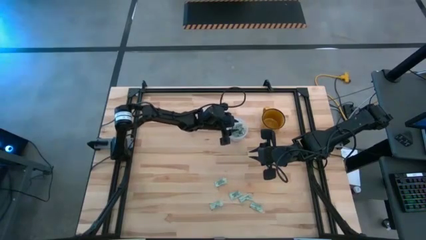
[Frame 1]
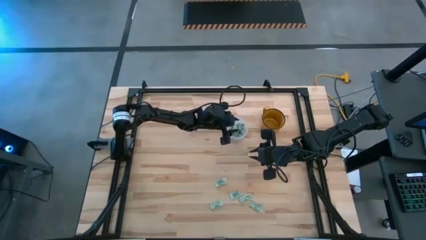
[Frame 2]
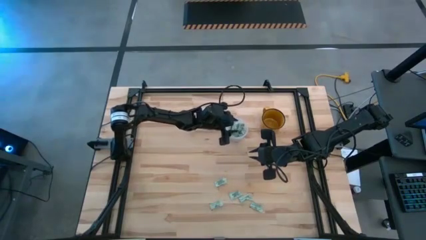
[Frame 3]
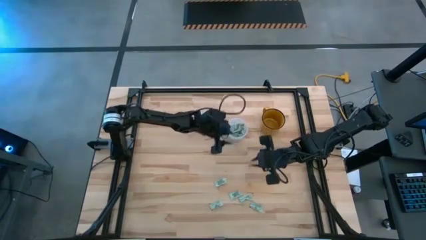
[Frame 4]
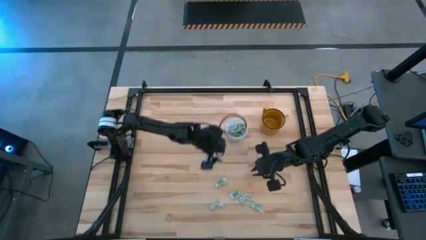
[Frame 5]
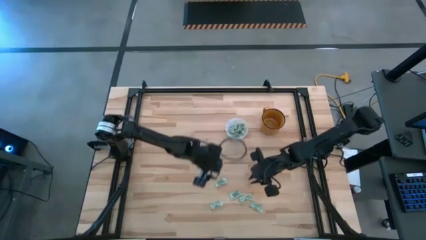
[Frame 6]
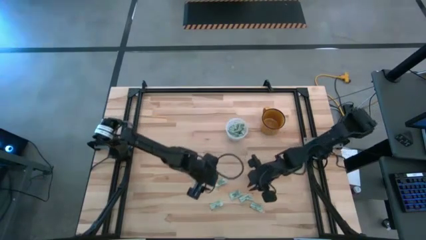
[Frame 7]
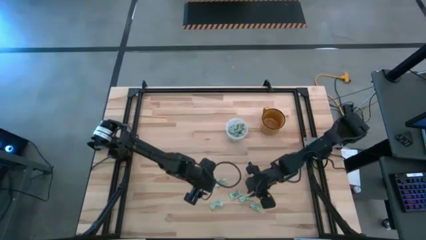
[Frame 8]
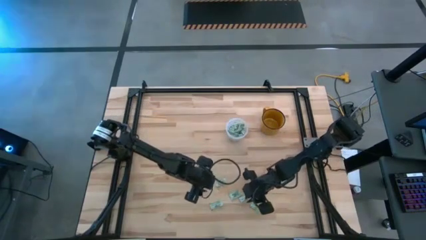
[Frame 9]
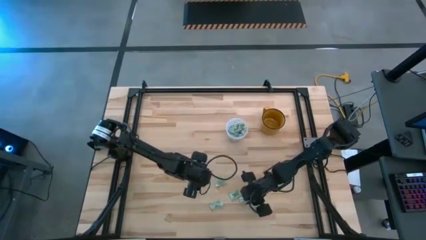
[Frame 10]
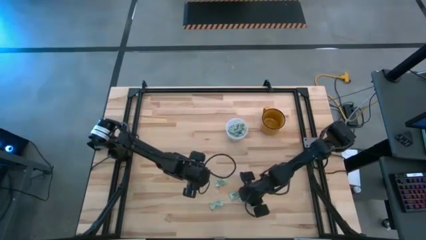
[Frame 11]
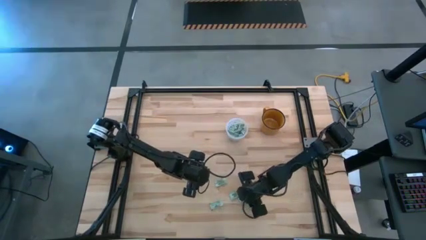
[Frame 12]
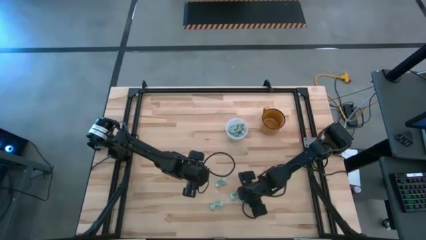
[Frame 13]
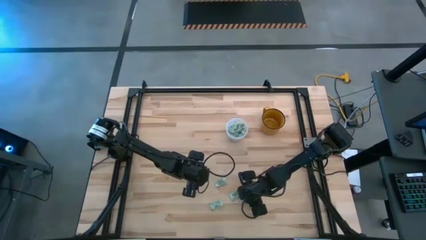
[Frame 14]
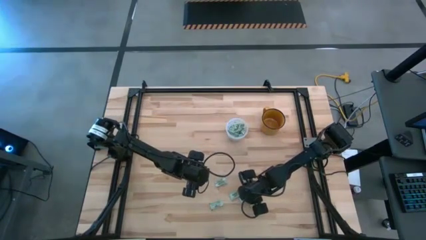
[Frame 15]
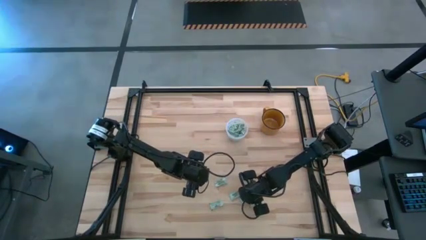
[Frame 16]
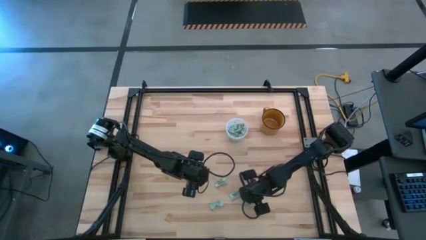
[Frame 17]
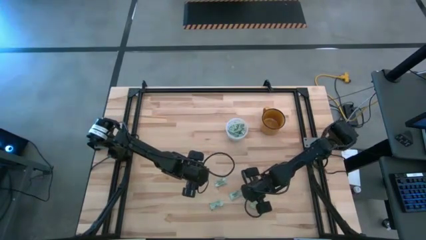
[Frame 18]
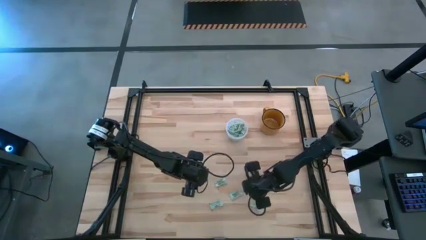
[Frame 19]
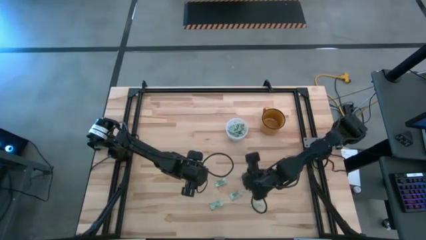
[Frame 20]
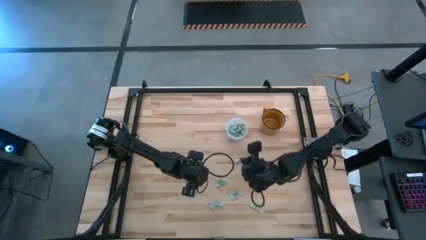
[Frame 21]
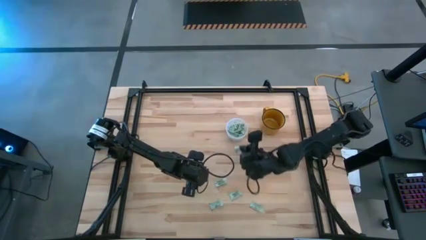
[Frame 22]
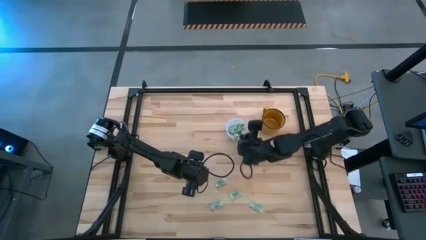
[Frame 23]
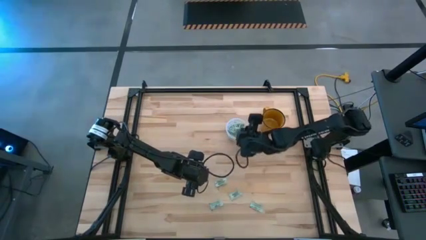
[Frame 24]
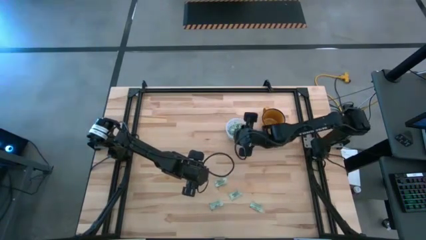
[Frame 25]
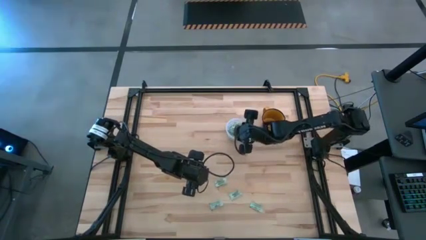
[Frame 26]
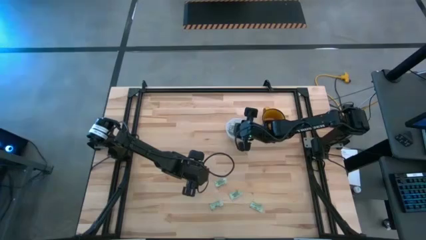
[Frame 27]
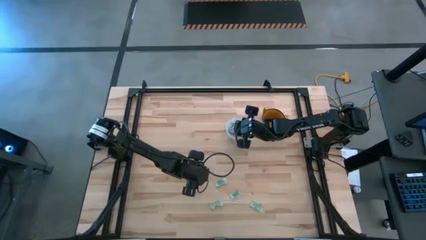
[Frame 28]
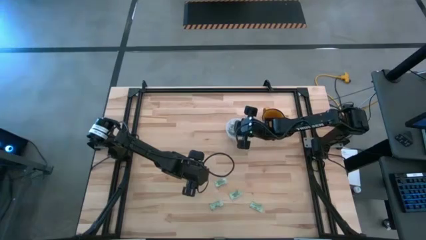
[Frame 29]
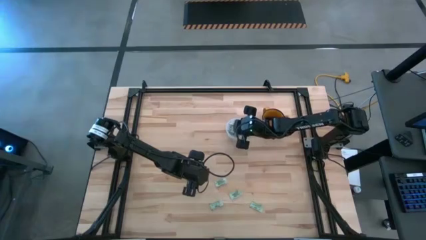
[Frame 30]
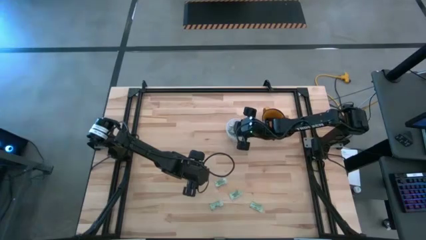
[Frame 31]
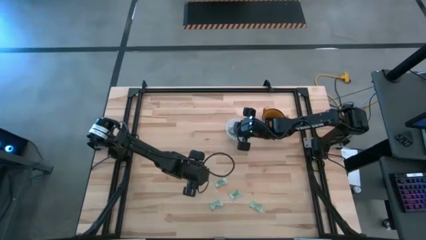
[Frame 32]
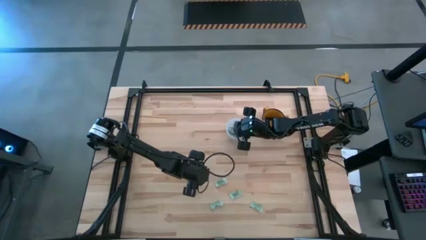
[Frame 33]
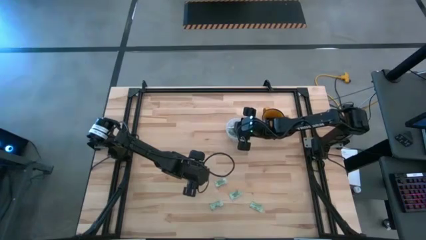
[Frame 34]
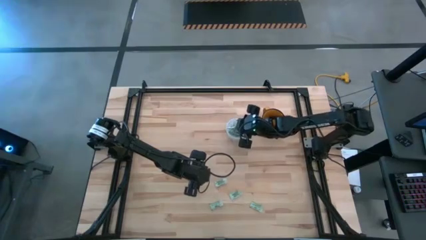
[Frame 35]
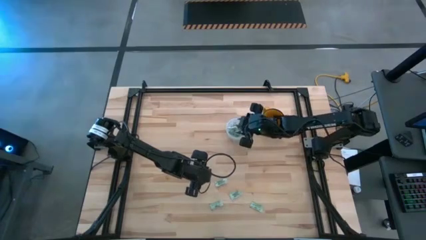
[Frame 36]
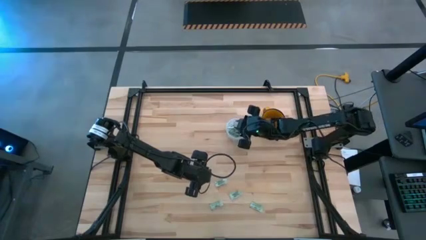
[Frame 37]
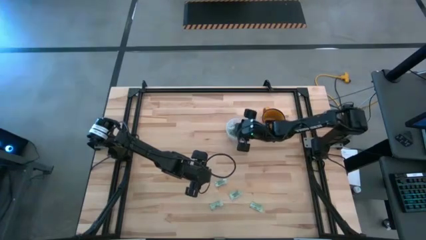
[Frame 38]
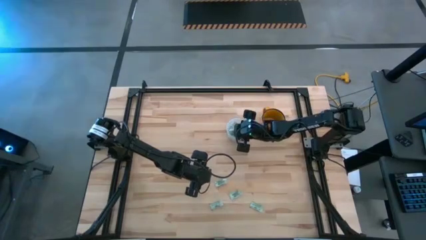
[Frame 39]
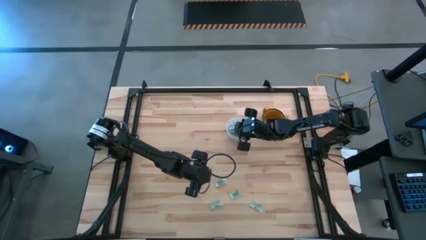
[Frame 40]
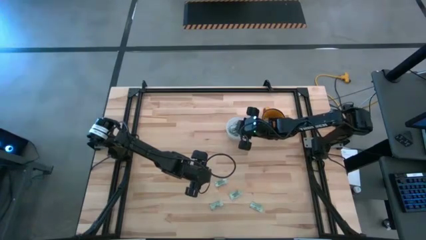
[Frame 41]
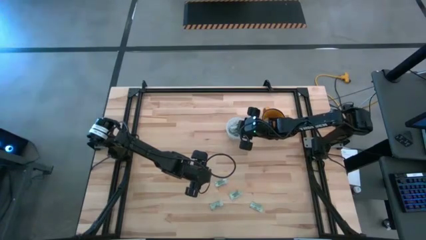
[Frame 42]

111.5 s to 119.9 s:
Task: Pick and place Stevia / Truvia into bins
Put the green stevia packet into the transparent bin

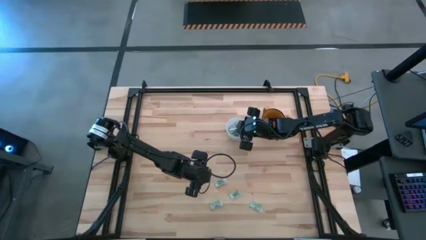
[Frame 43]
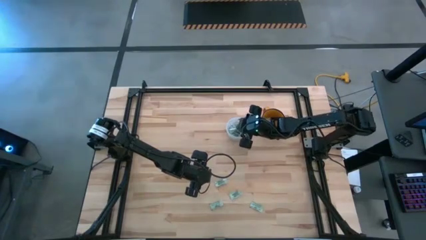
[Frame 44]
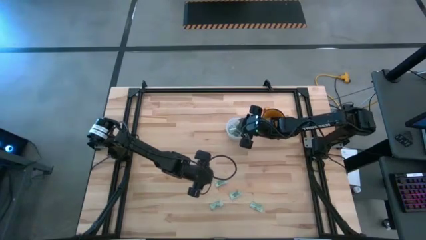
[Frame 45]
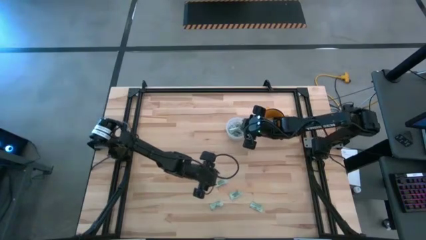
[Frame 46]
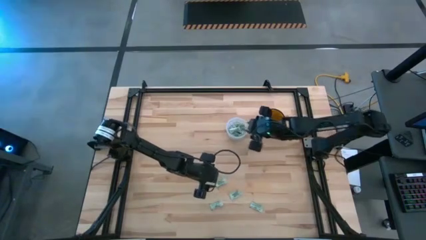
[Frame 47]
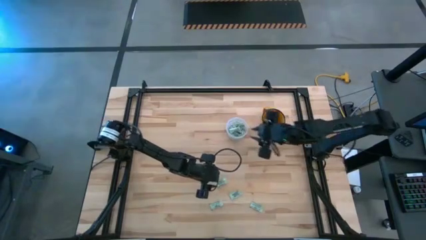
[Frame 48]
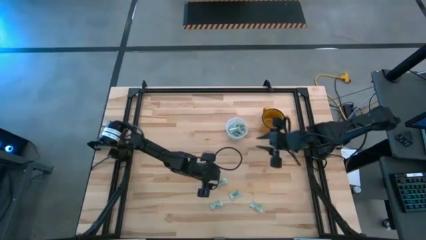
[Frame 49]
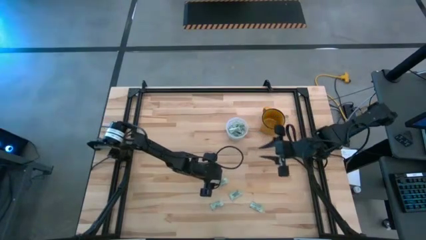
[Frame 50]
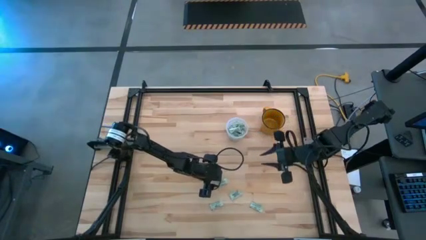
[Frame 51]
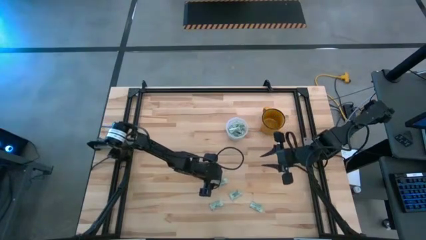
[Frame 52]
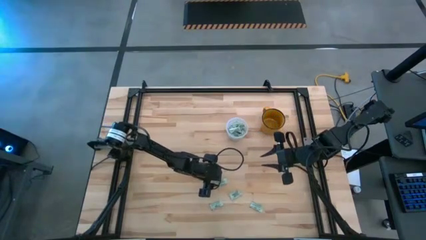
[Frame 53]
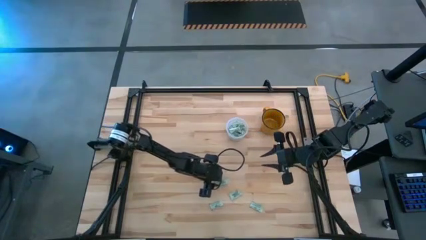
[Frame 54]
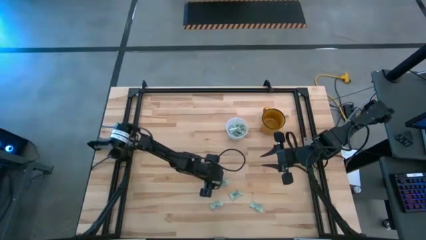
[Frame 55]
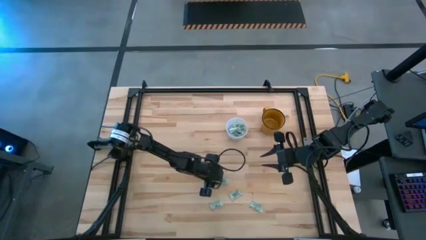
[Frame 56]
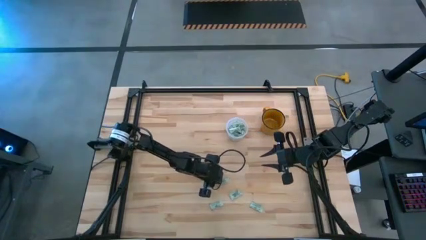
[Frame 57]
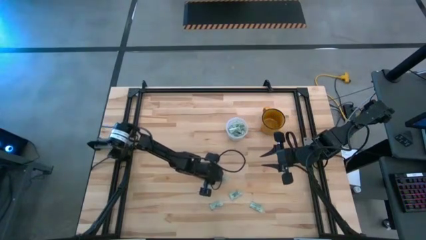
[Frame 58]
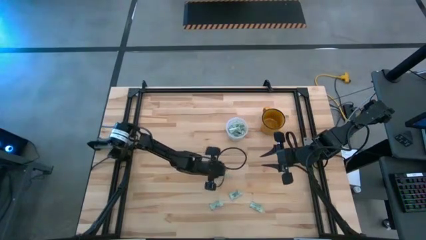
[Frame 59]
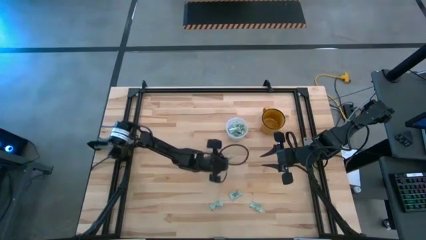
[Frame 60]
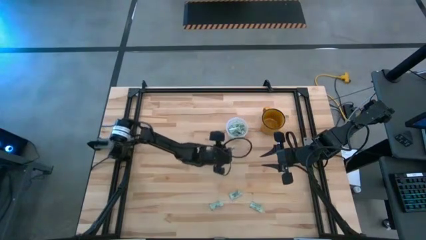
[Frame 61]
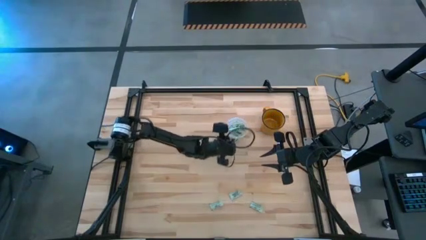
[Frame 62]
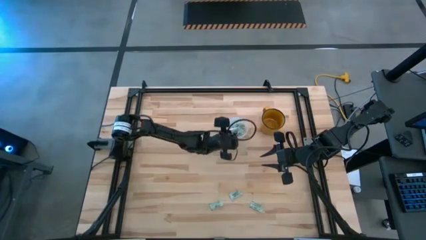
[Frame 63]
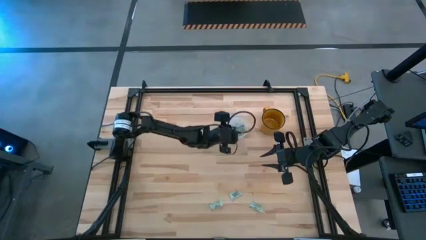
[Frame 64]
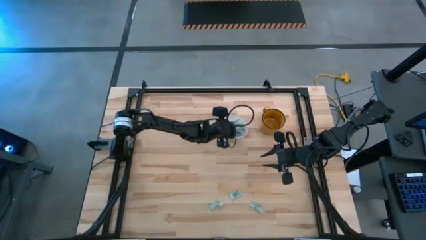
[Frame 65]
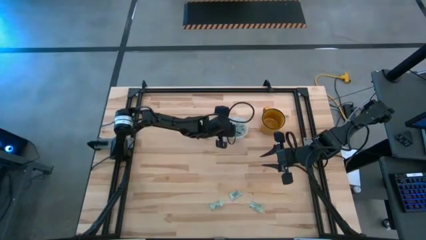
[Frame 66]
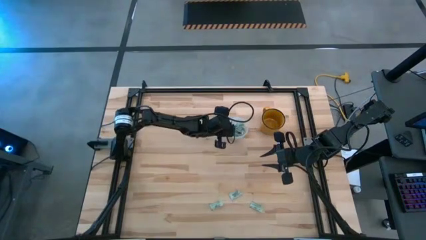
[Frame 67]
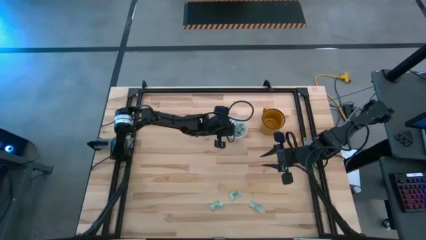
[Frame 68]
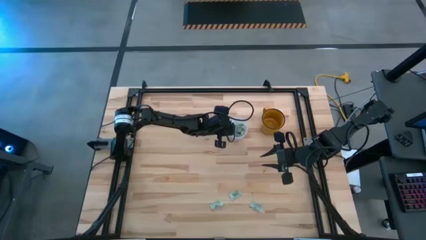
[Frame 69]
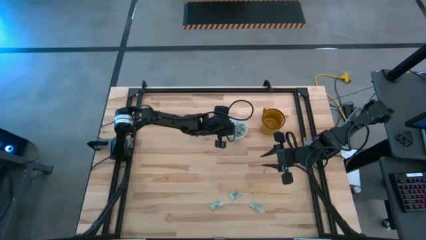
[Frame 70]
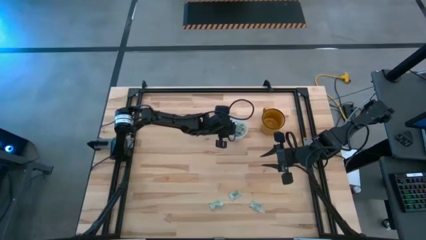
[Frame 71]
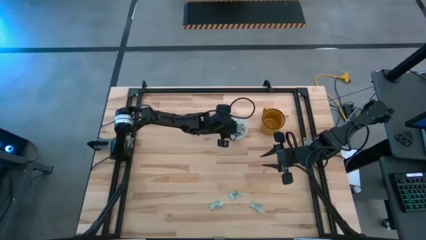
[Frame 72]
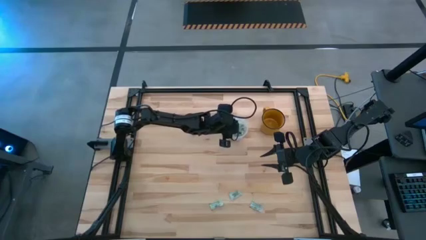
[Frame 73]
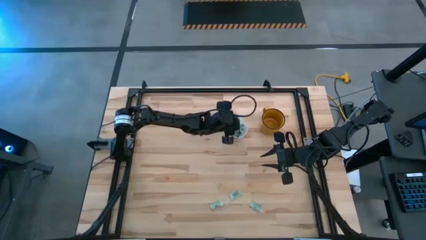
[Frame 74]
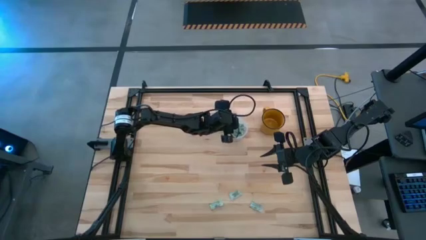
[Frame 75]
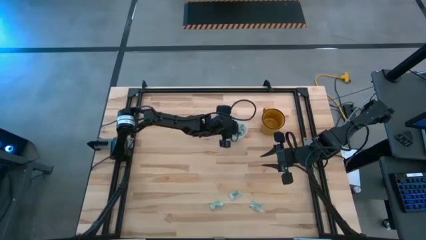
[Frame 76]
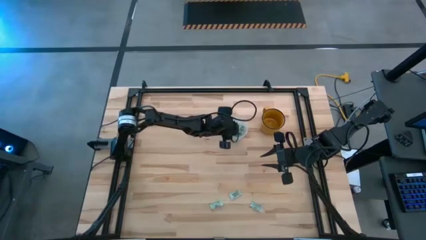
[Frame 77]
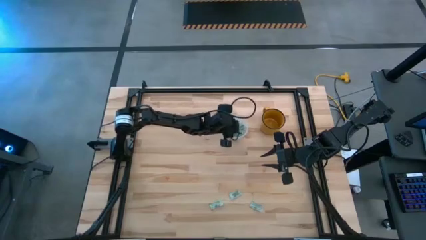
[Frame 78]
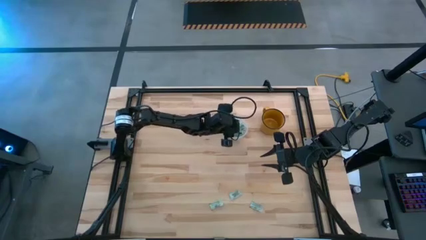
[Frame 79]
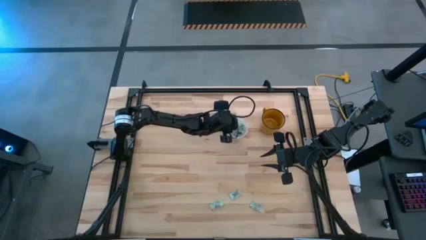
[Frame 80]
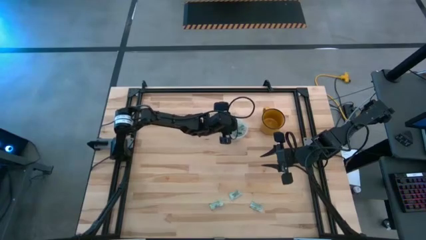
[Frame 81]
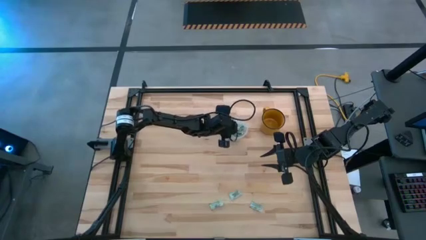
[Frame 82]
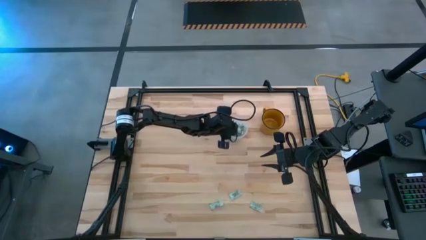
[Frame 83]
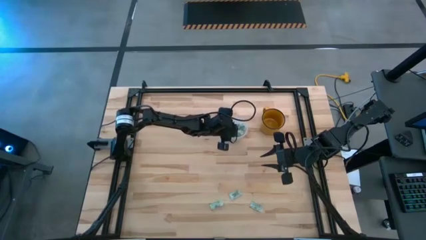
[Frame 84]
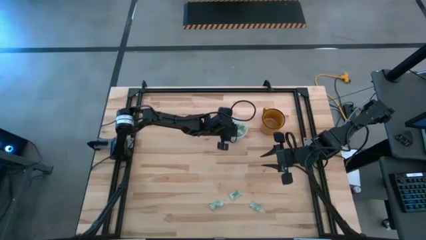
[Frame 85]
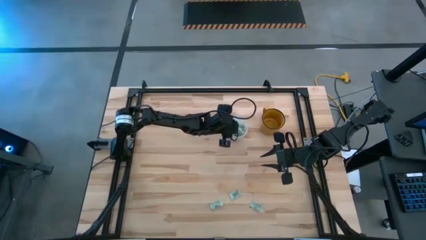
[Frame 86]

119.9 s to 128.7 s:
Put the green stevia packet into the transparent bin
